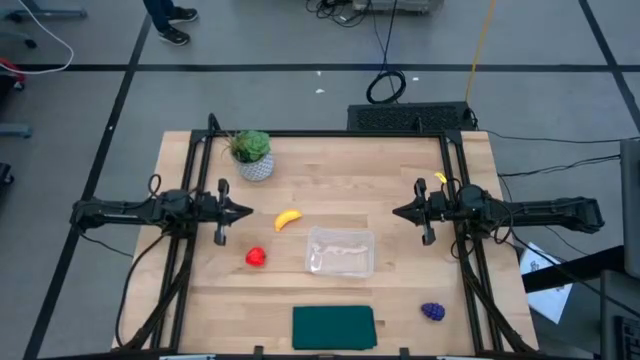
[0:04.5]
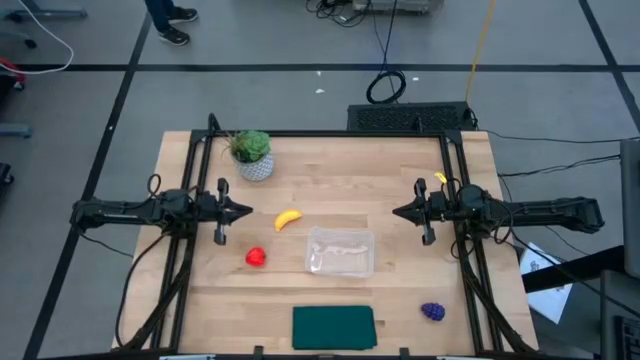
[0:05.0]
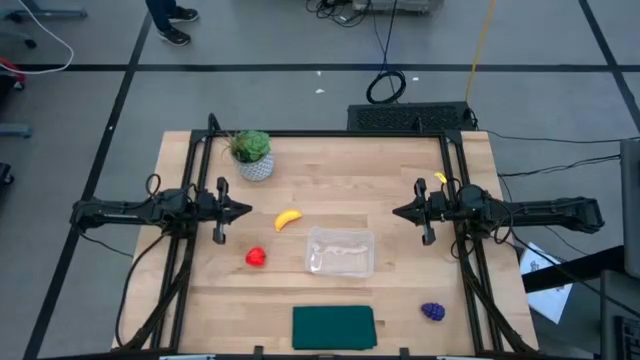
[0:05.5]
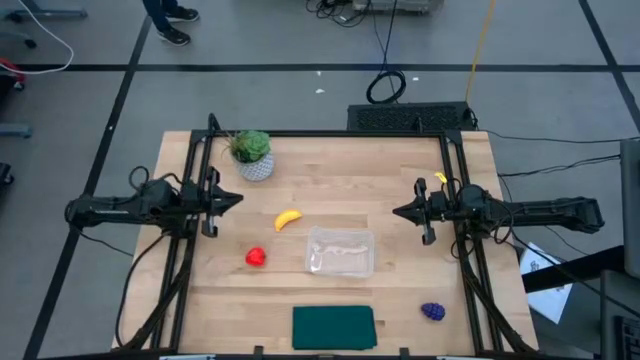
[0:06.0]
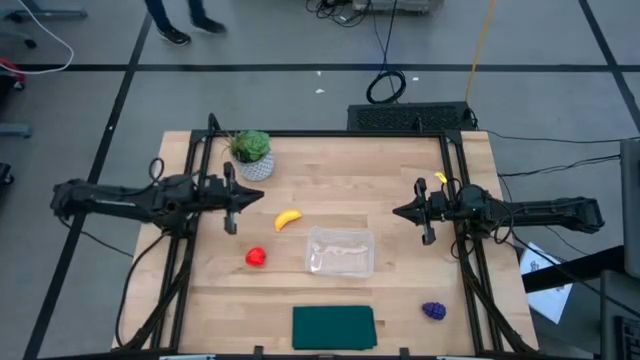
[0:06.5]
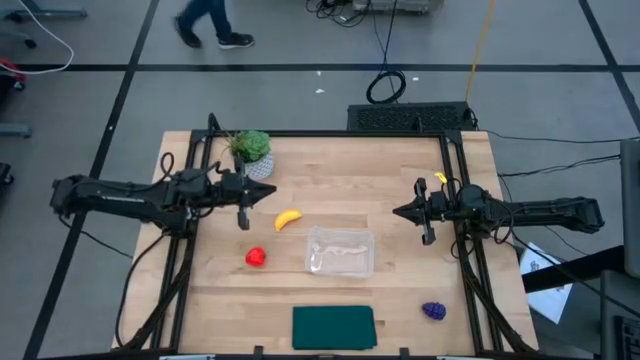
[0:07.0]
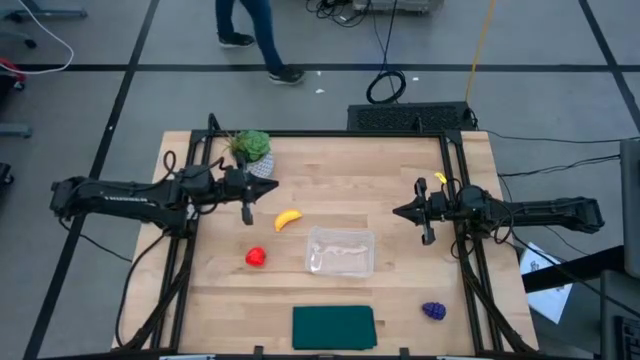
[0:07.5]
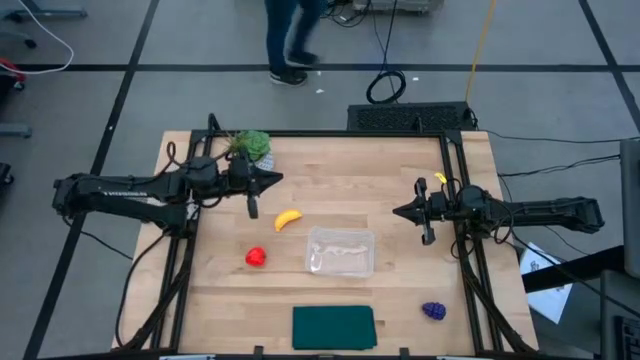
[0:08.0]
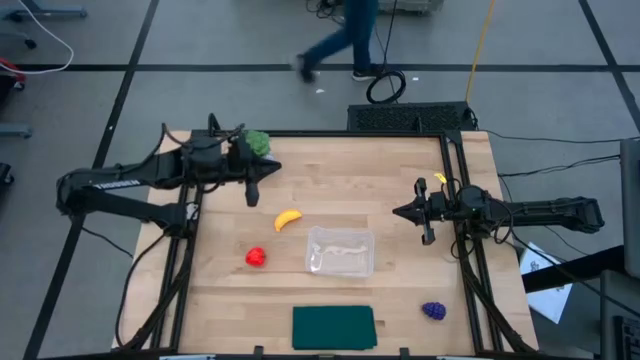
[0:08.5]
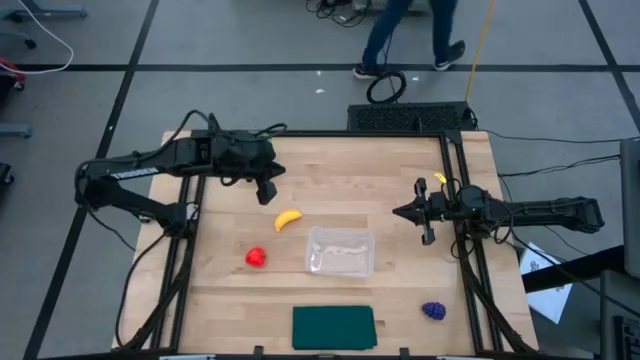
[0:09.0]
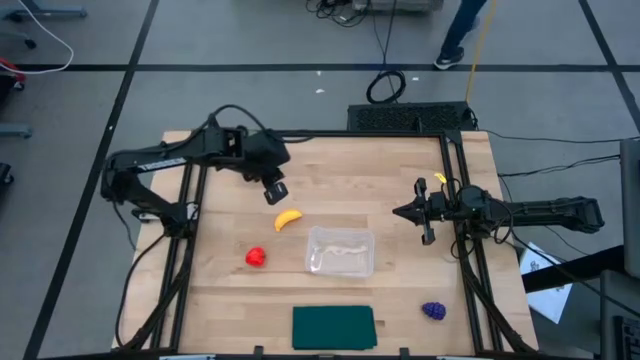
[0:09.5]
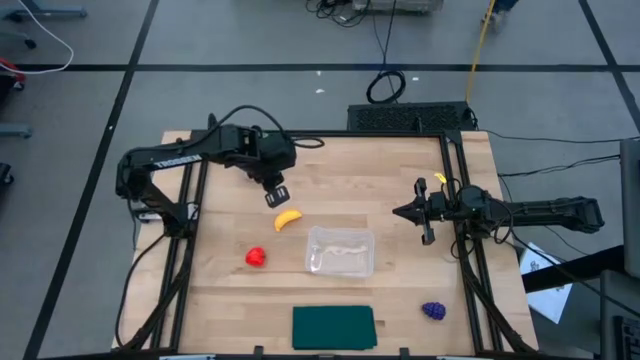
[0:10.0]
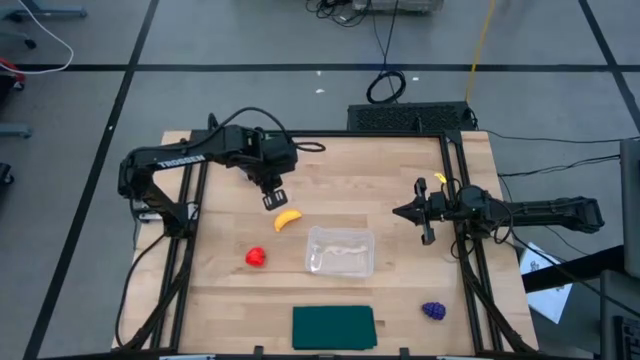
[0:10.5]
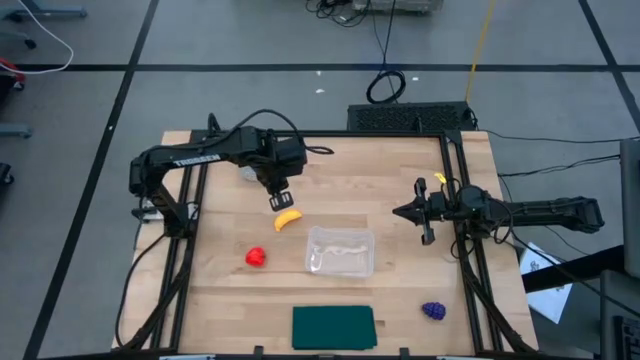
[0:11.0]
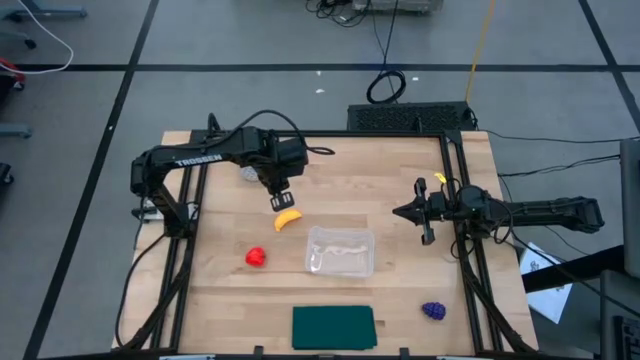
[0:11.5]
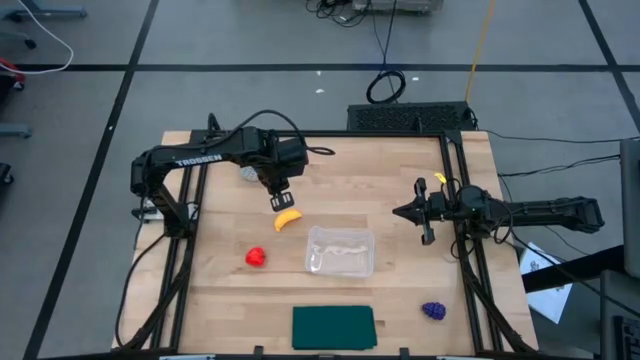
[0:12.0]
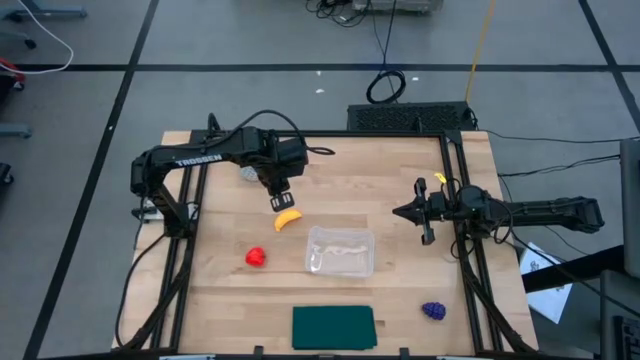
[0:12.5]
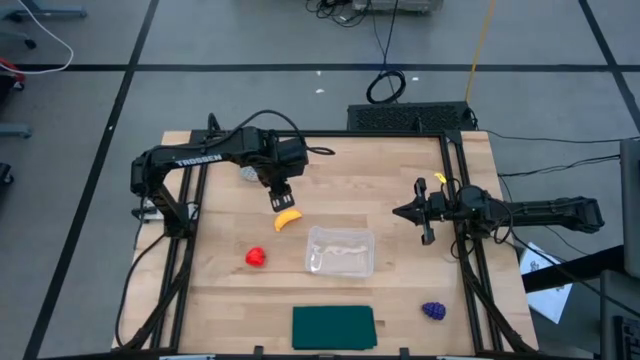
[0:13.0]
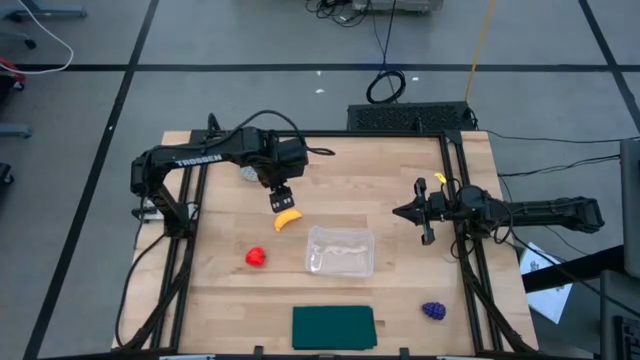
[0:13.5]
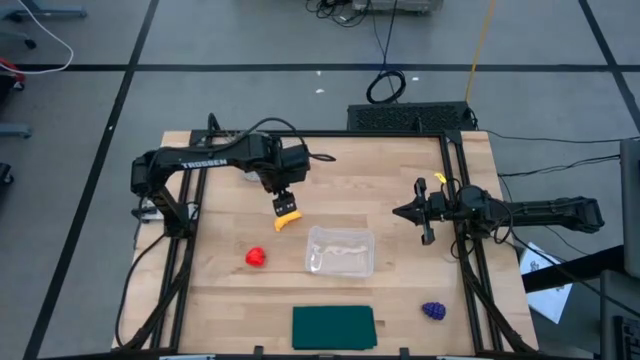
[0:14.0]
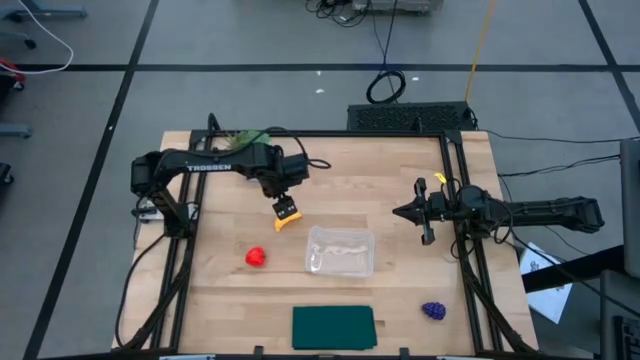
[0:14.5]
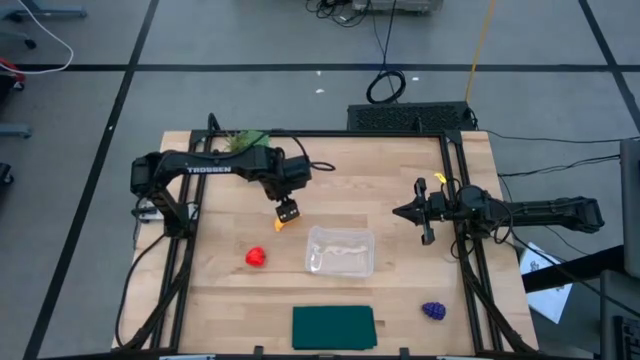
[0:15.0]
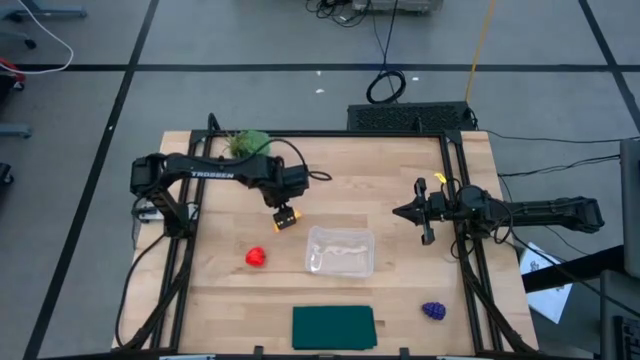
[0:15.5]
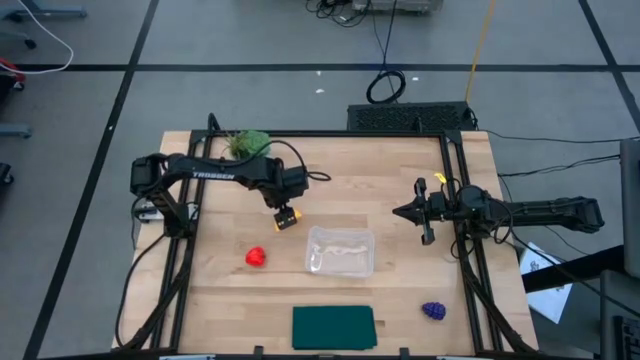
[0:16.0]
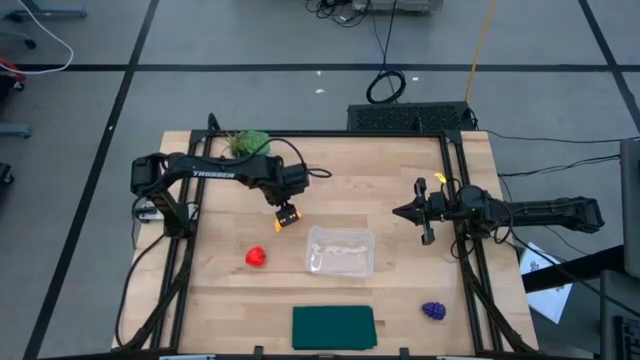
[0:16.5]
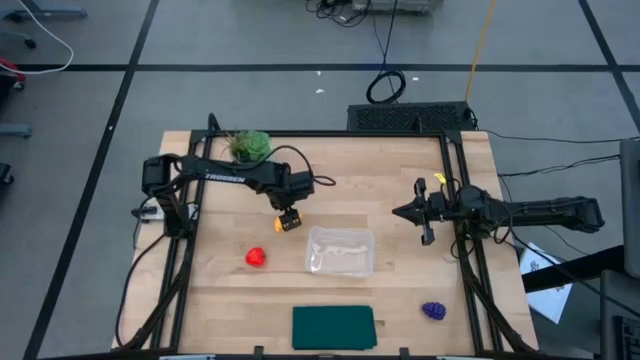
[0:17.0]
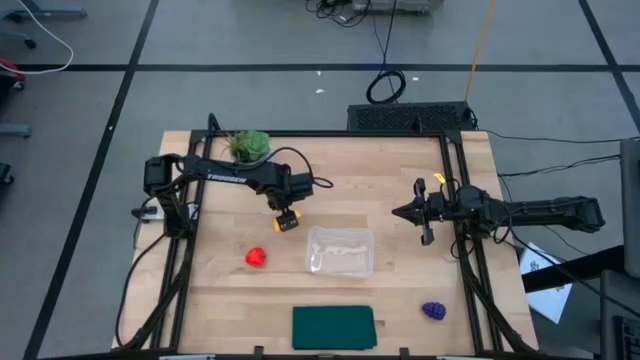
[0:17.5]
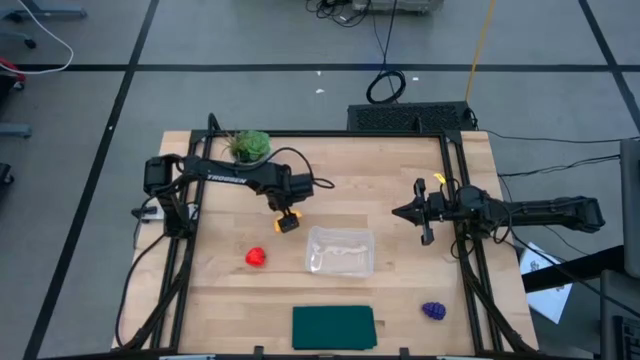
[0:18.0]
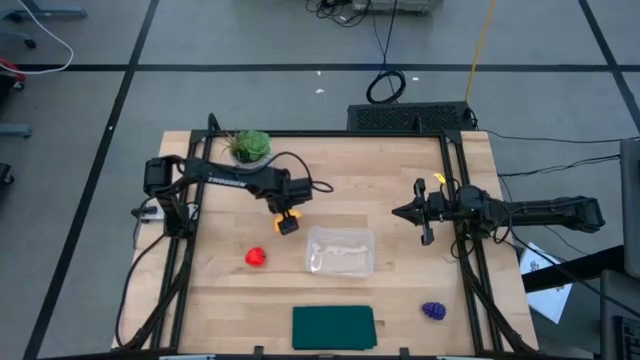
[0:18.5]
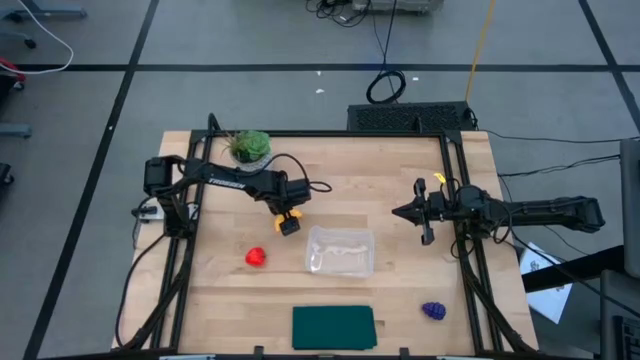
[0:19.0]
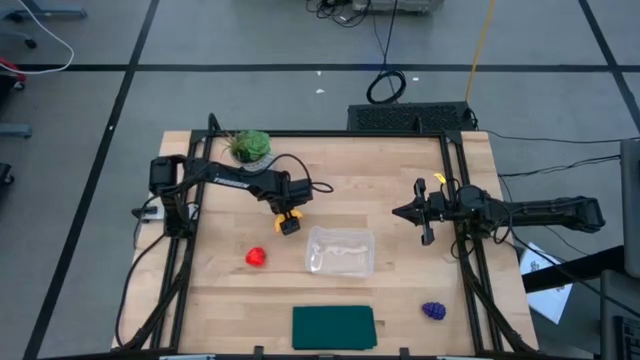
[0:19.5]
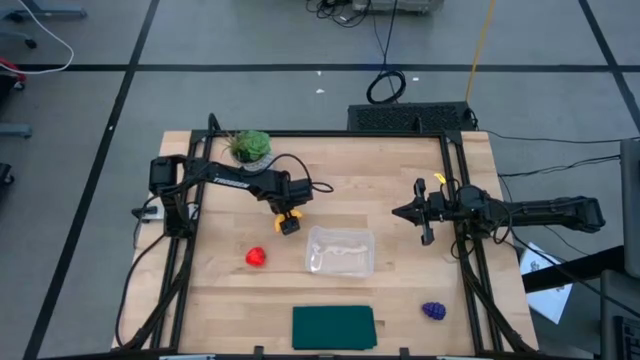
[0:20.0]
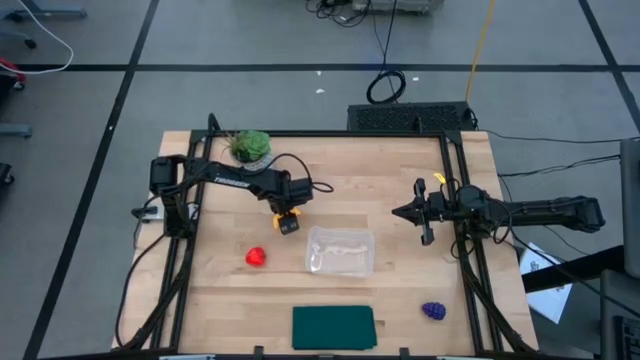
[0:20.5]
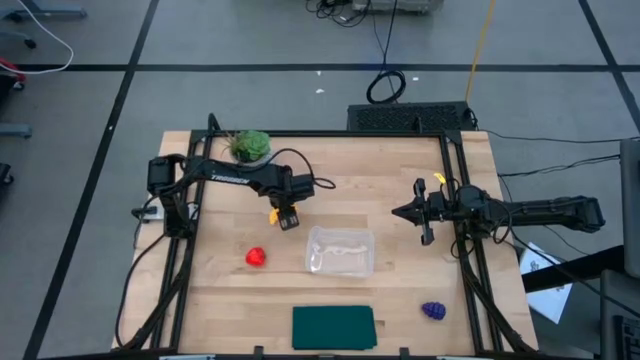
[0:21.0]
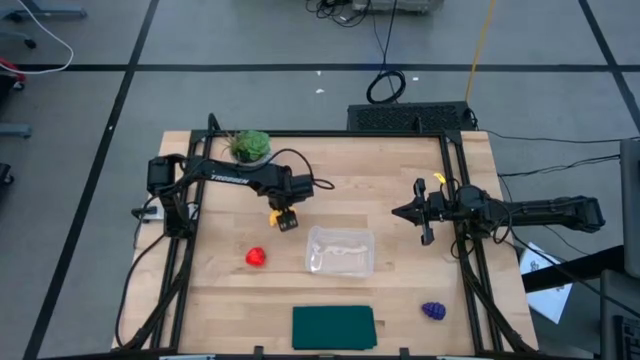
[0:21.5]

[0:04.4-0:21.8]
Task: Pick and placing Produce into tupperware
Put the banana into the transparent bin

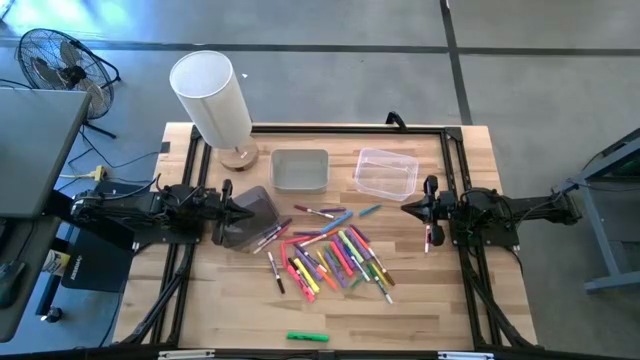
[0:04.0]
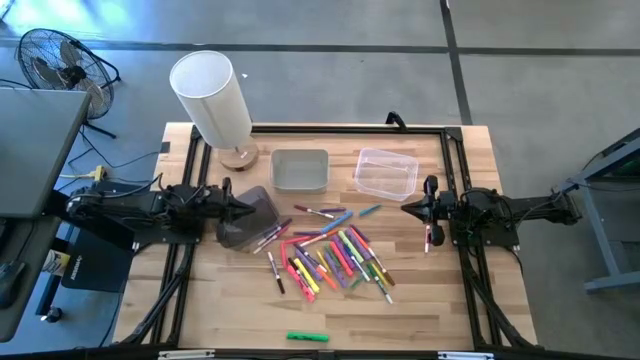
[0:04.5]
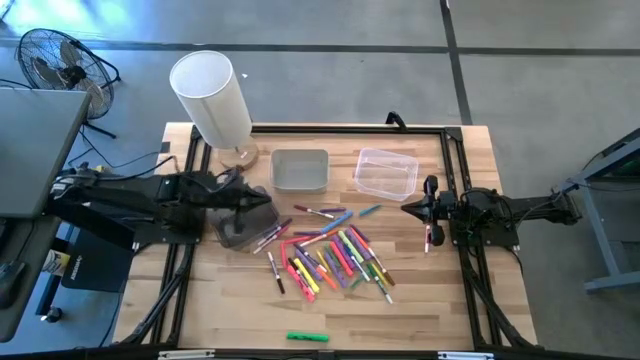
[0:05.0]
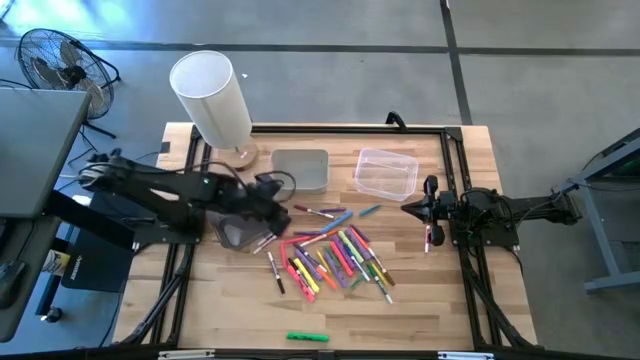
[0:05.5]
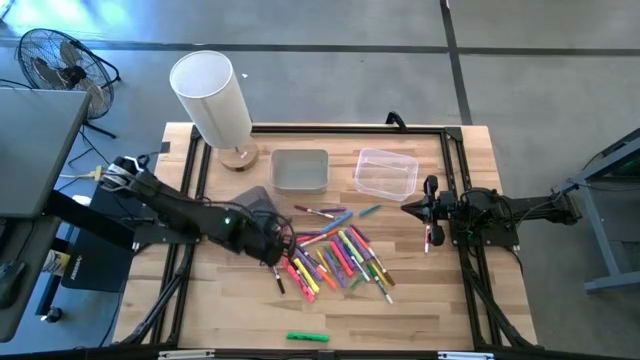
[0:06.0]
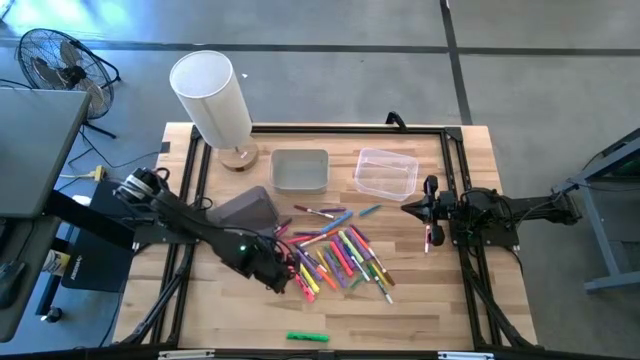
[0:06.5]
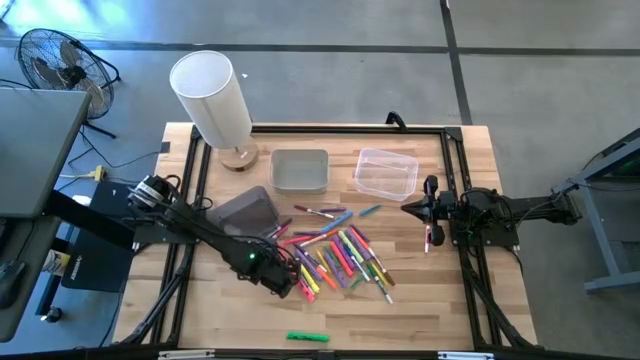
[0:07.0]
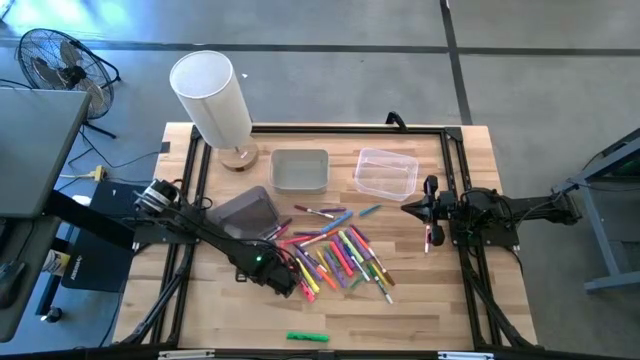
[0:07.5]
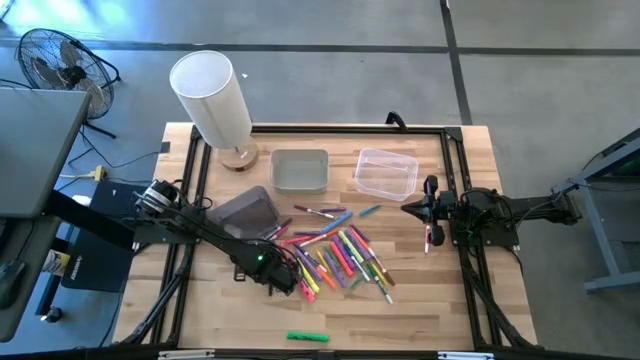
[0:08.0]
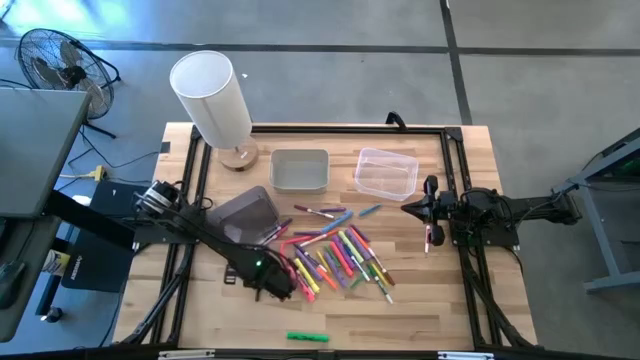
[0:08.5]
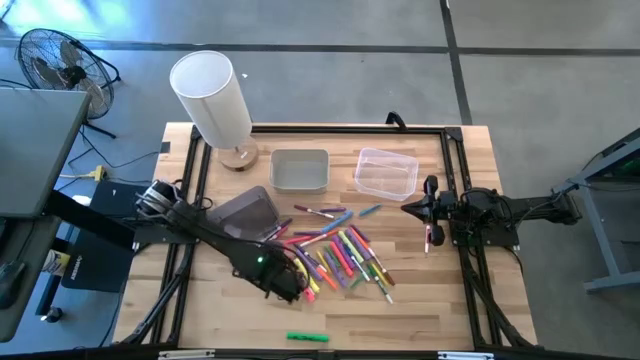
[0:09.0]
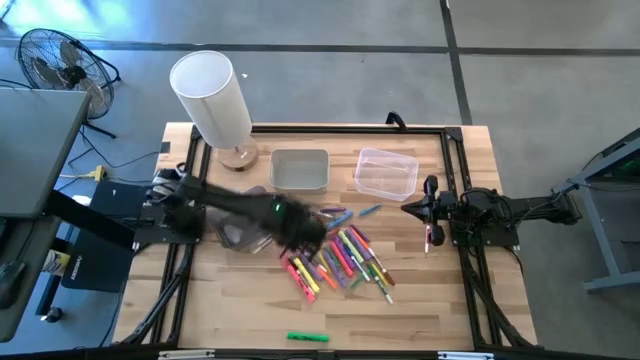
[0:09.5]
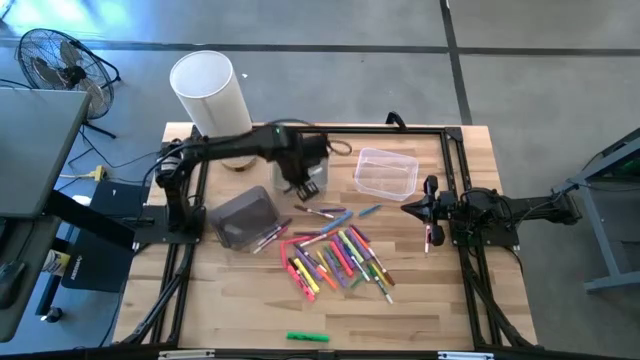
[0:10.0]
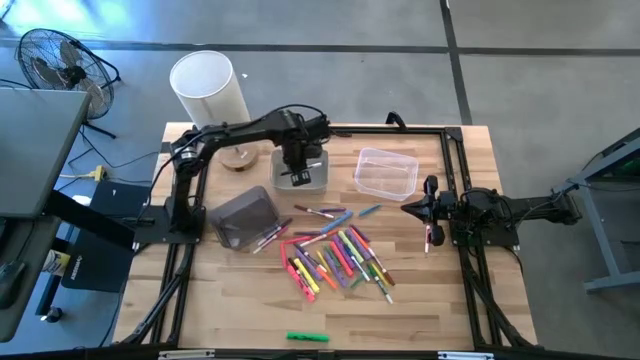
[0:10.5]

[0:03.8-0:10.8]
Task: Pick & Place Markers
Put the black marker pen into the white bin
